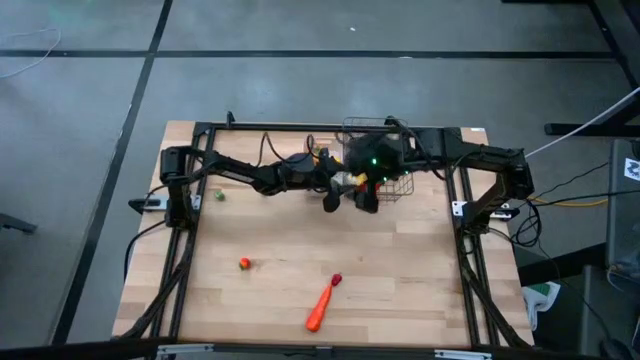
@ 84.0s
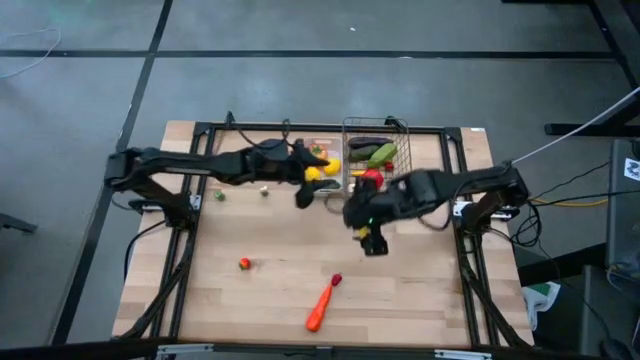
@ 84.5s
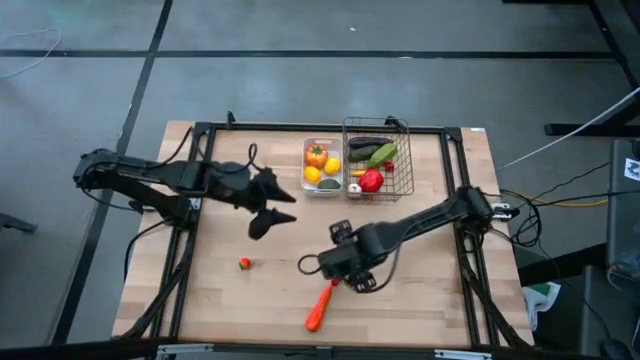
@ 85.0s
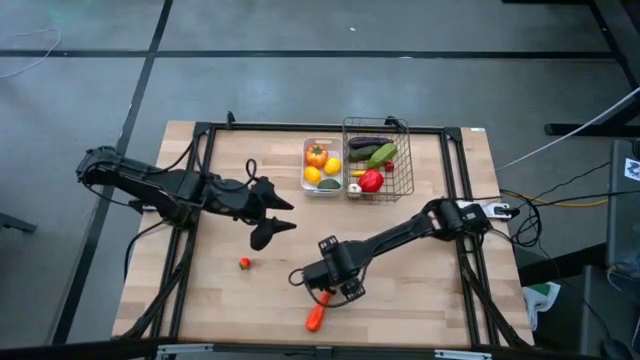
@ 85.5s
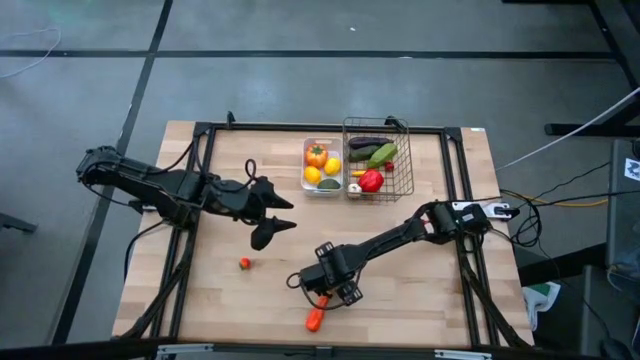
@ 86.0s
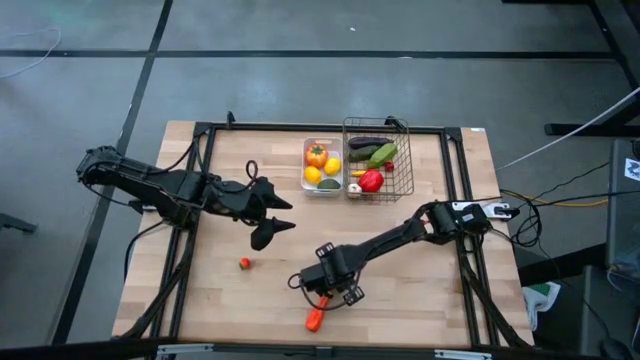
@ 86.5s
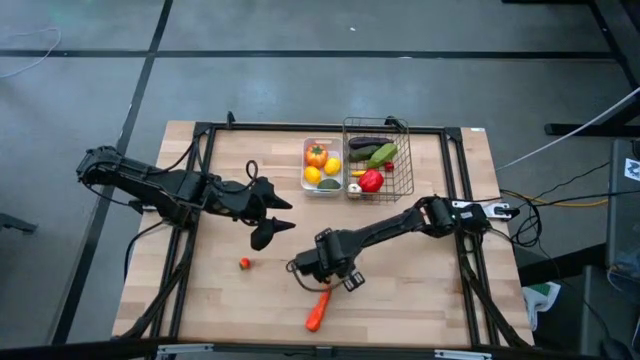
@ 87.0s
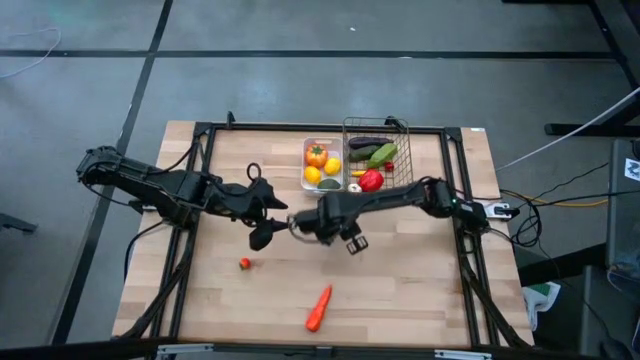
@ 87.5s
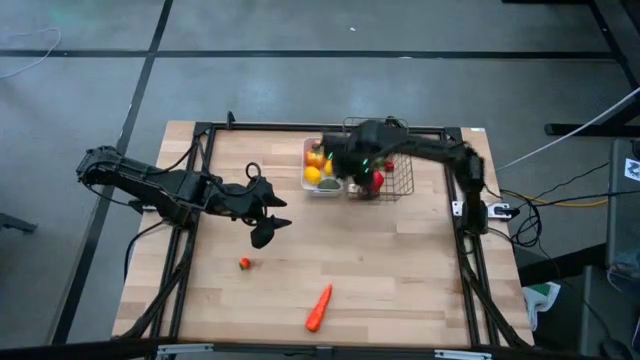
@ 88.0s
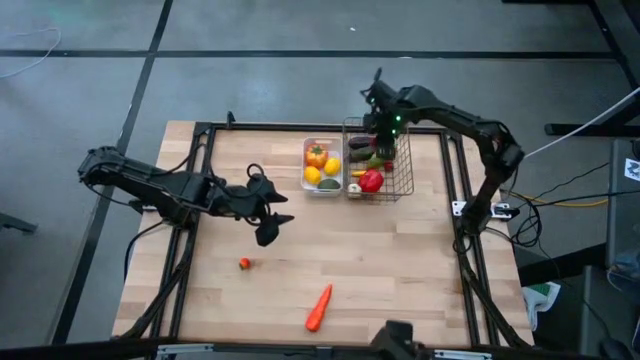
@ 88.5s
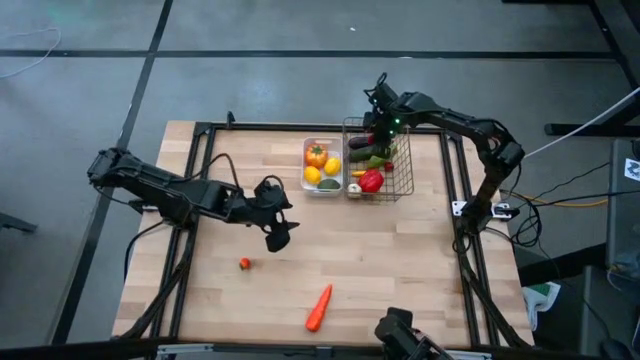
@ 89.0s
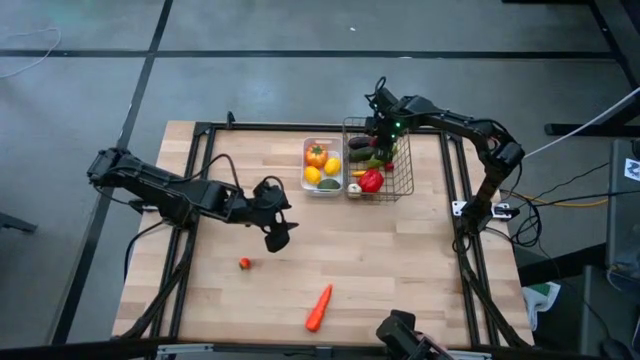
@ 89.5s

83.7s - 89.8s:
Task: Sort produce into baskets
Put the red bell pepper into the gold wire basket

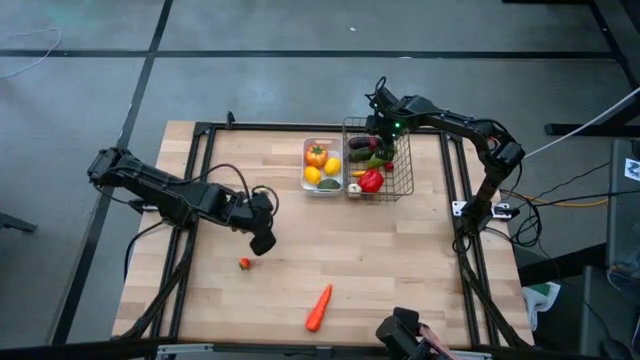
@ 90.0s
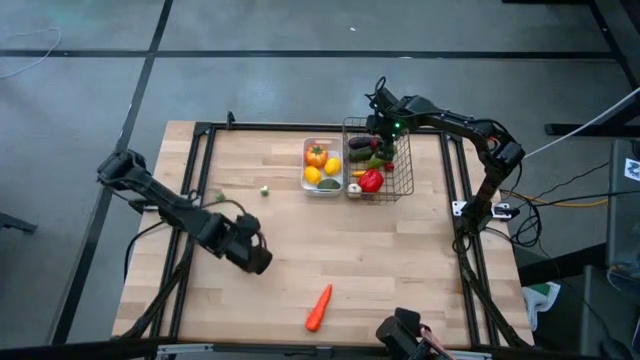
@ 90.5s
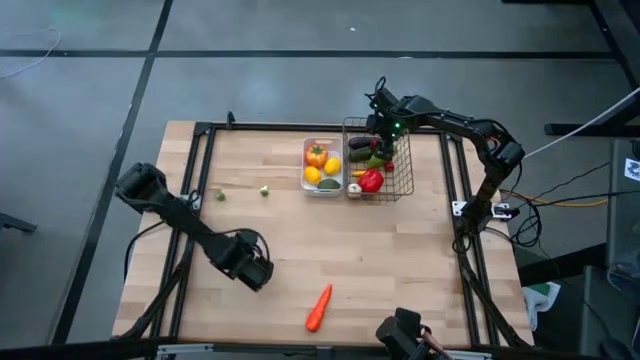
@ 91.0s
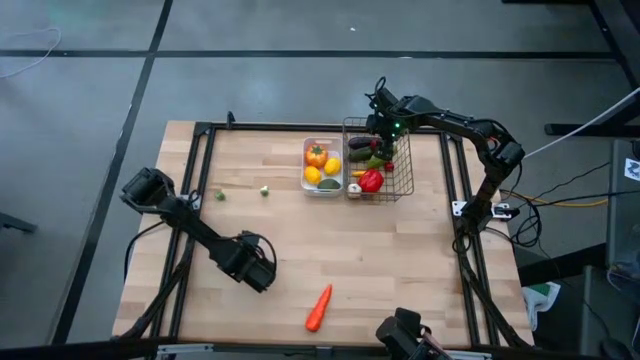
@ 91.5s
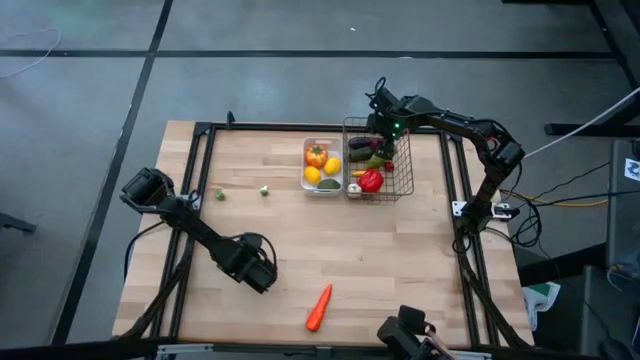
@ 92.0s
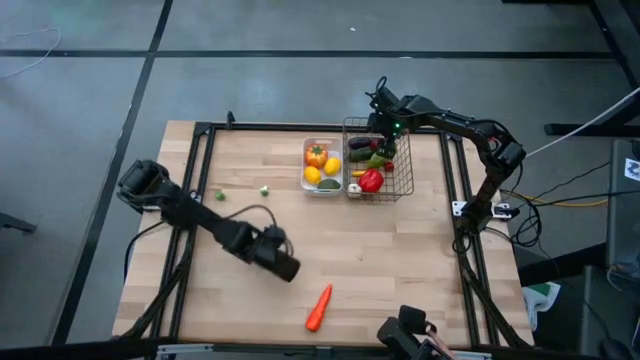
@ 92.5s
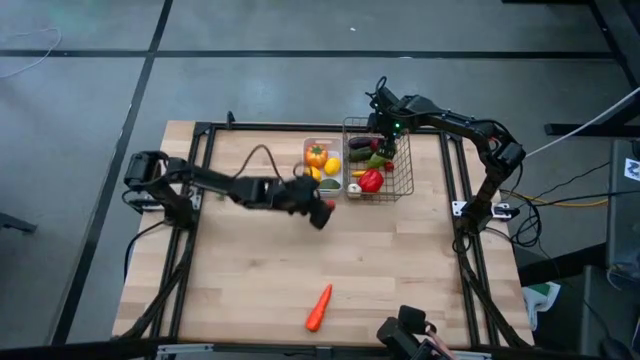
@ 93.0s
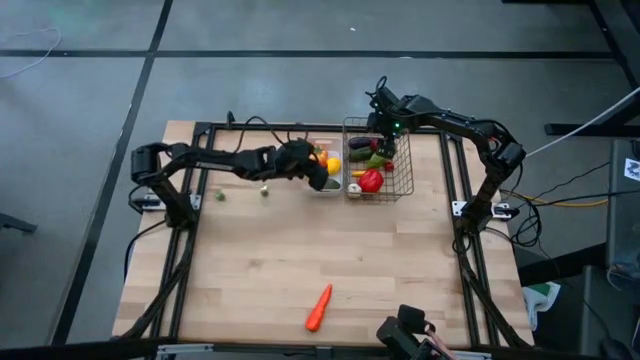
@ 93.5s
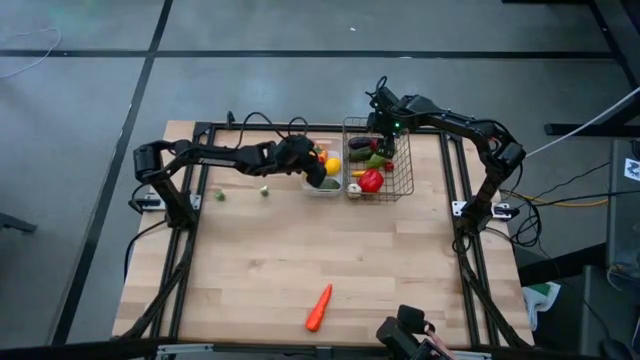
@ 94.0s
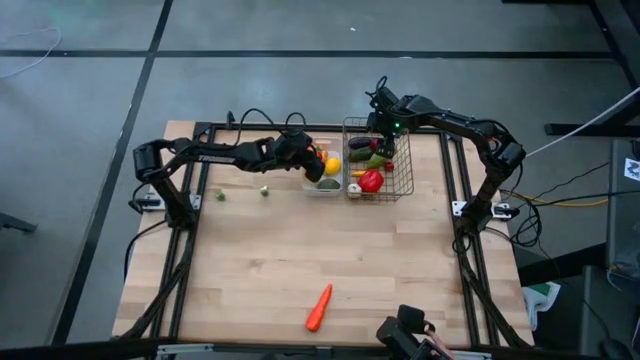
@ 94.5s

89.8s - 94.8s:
Put the red tomato into the white bin

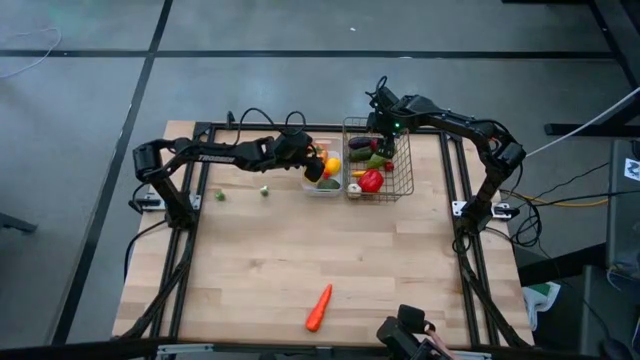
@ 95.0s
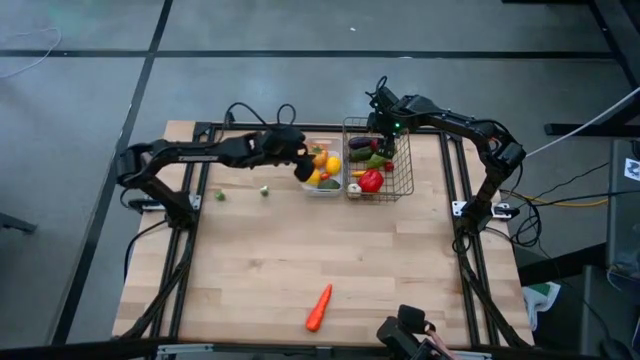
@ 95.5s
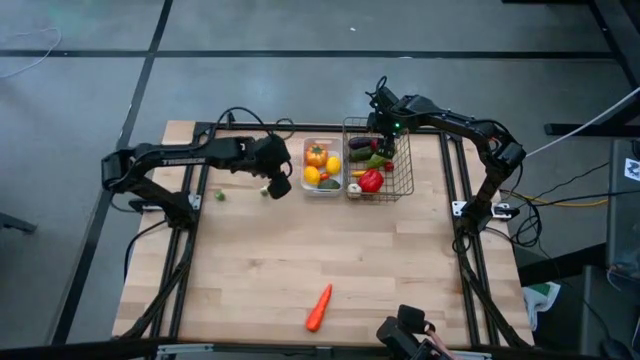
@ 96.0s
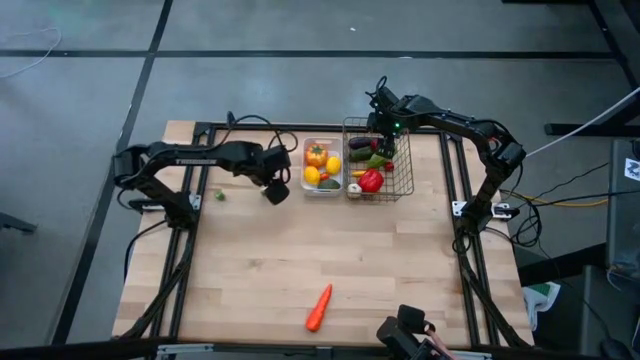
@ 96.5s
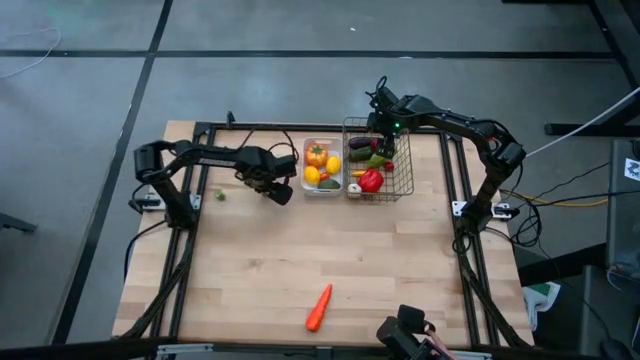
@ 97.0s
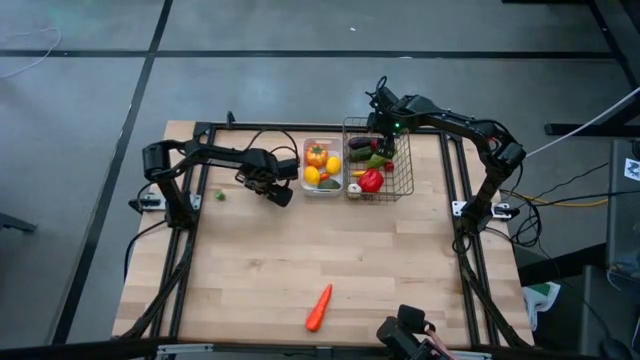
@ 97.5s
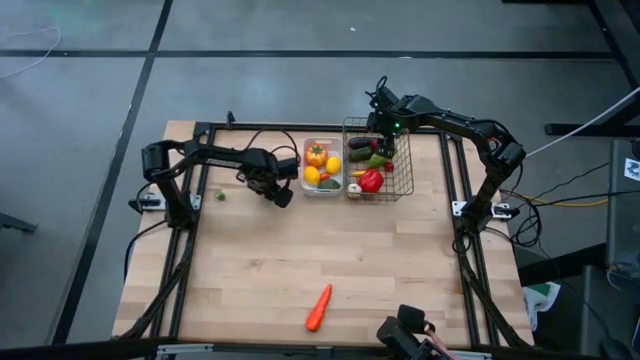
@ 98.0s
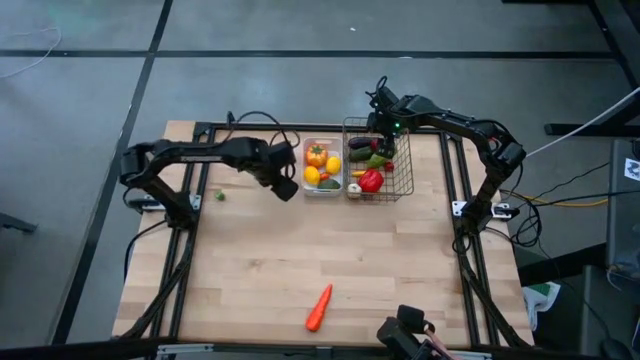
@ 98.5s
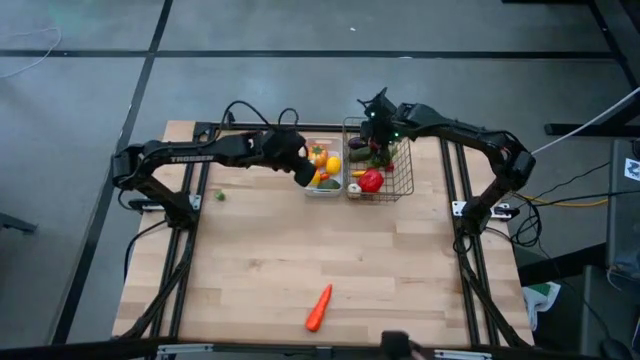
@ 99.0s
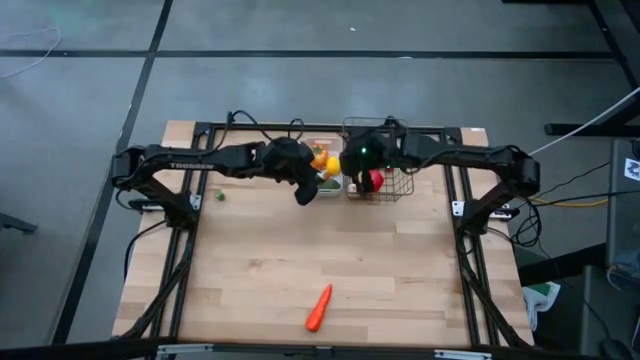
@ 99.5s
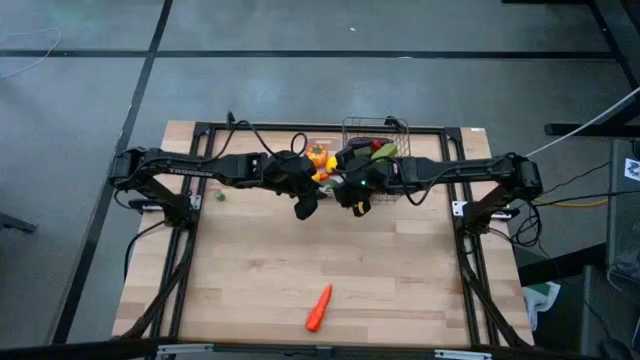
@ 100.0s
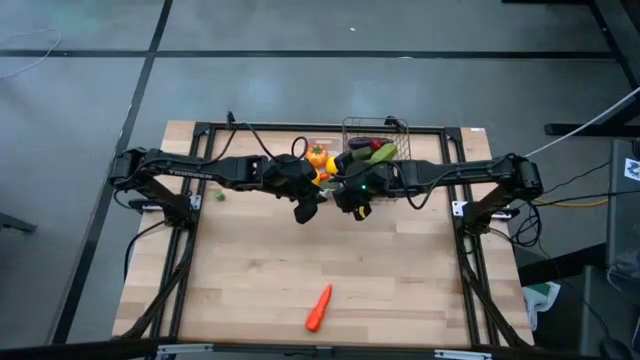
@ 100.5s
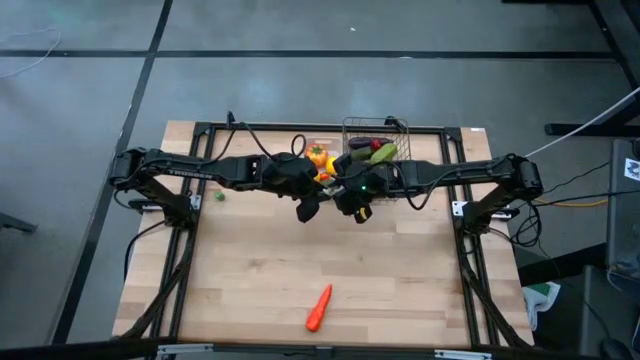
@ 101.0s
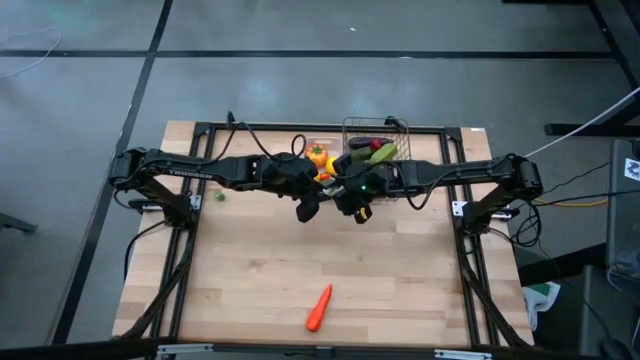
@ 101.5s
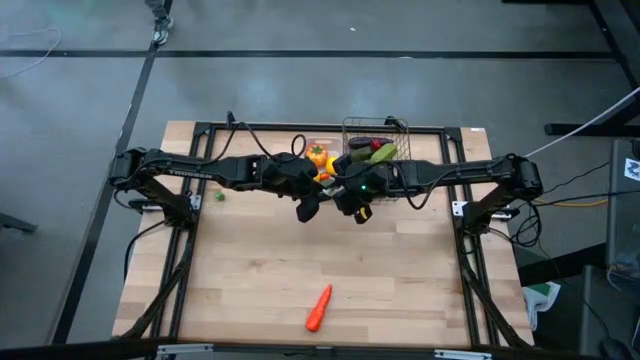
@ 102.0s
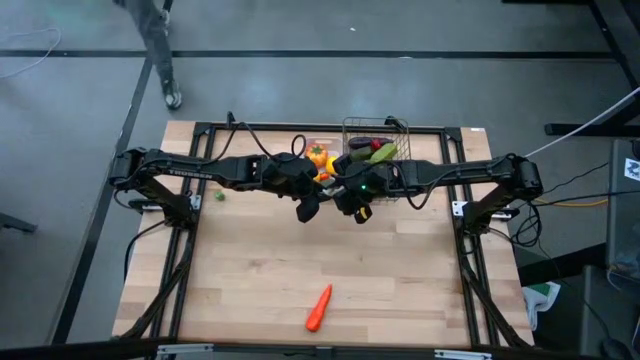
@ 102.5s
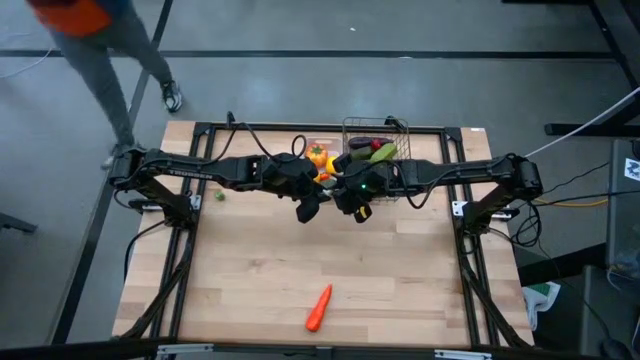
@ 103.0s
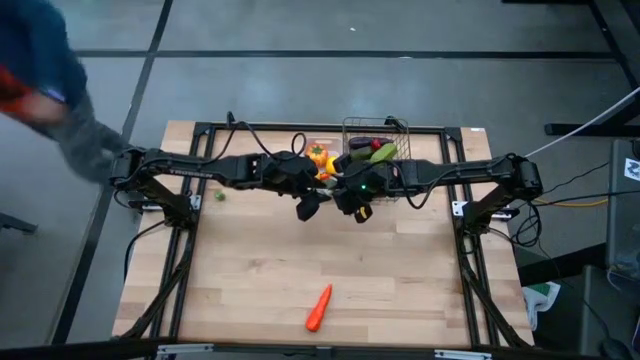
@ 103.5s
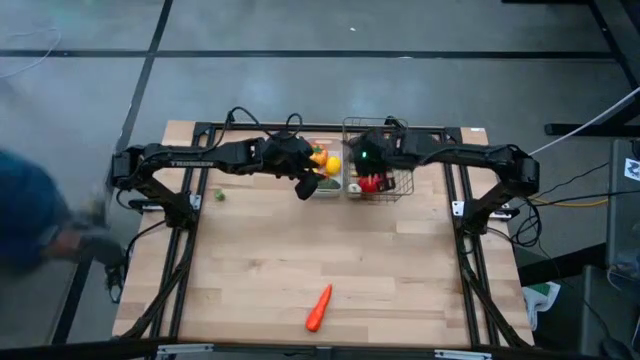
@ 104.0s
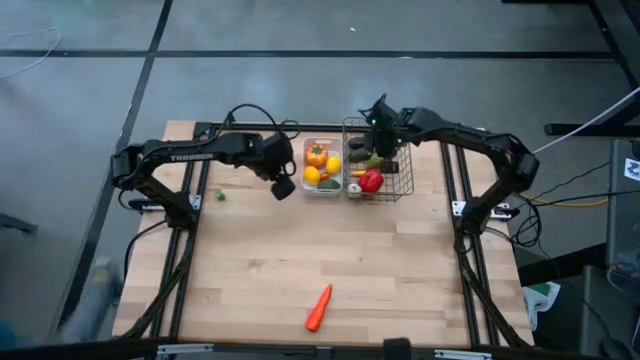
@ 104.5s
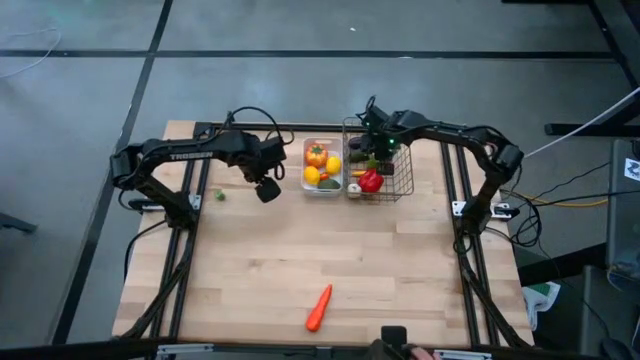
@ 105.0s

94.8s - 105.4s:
Put the white mushroom into the gold wire basket

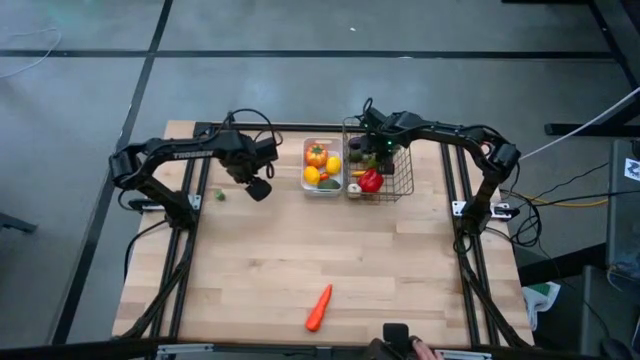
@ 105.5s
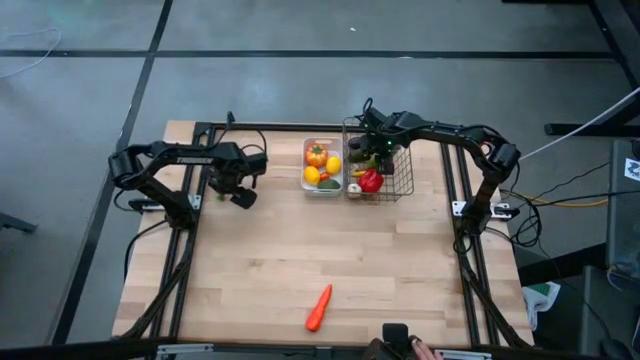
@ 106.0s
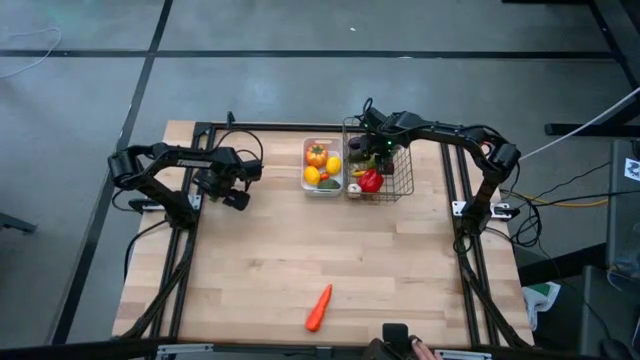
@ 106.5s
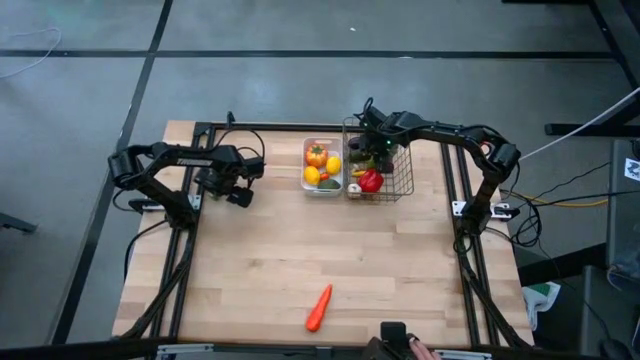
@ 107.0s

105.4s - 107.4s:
Put the green bell pepper into the gold wire basket
